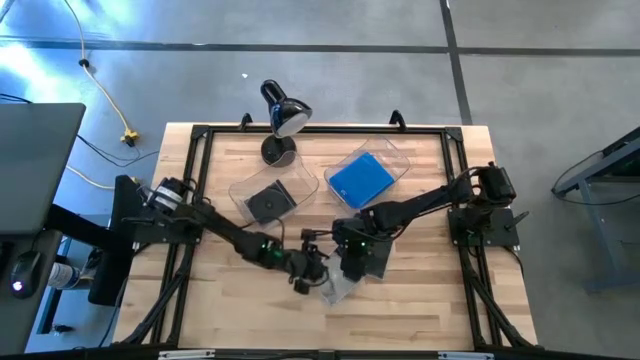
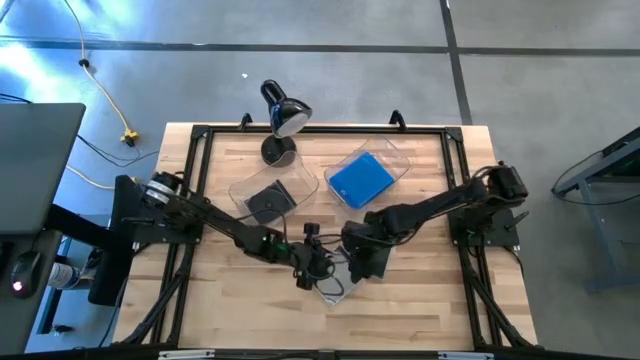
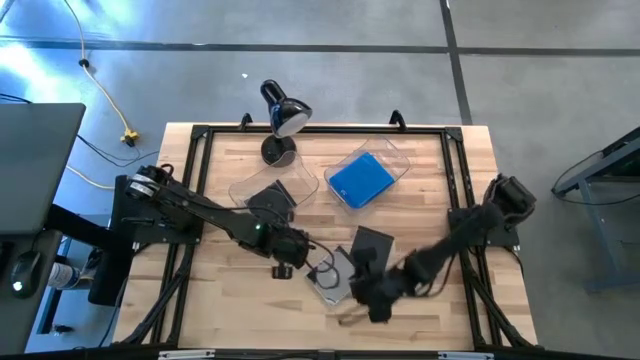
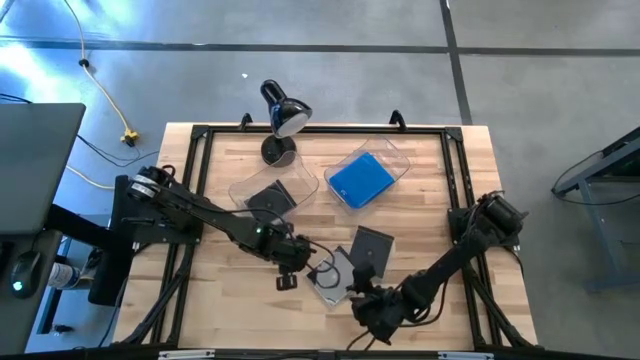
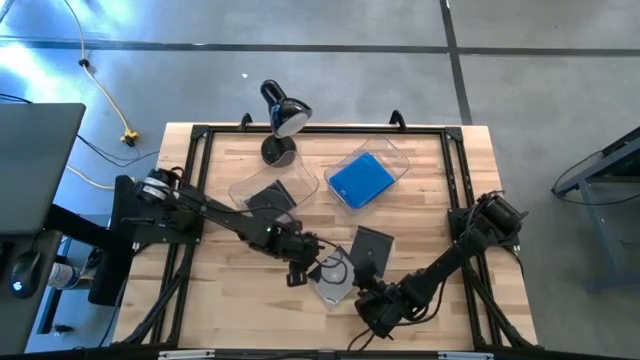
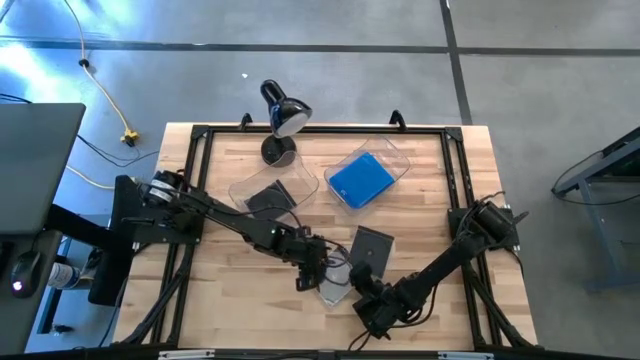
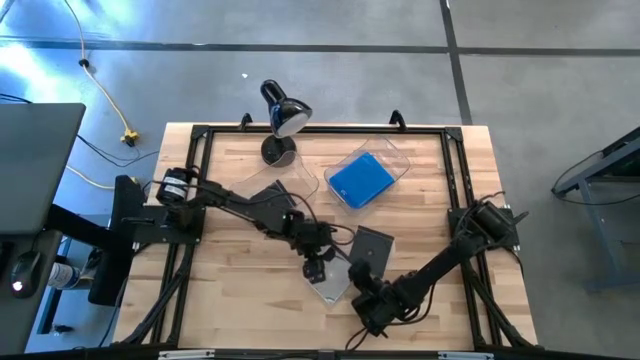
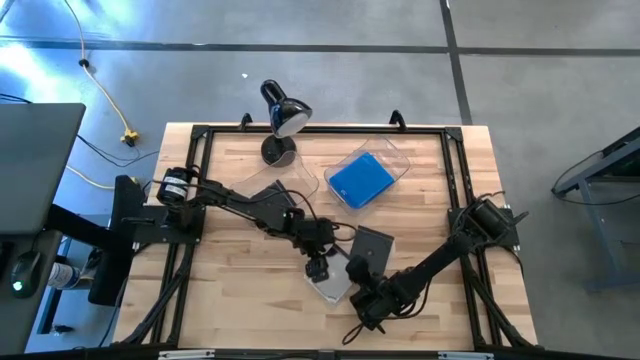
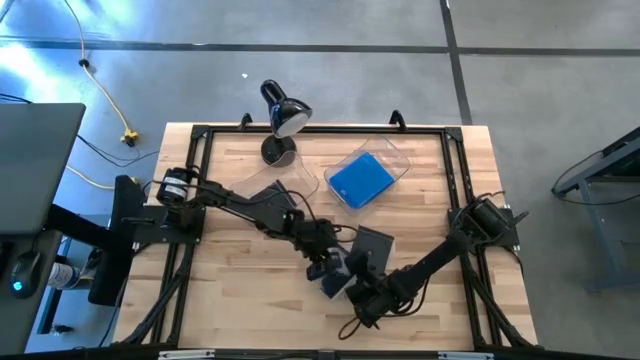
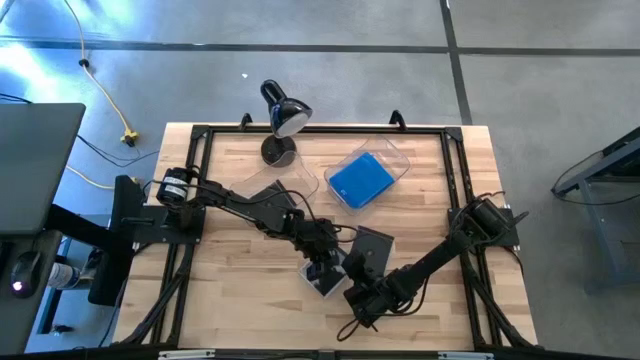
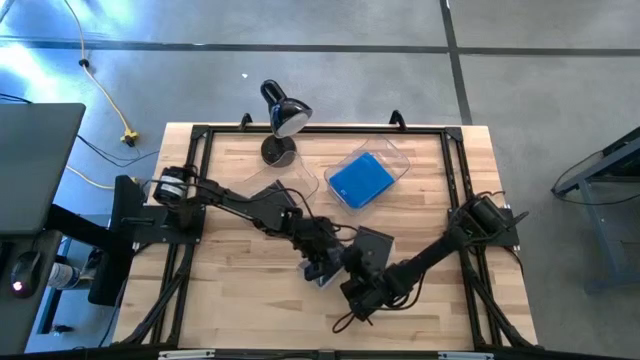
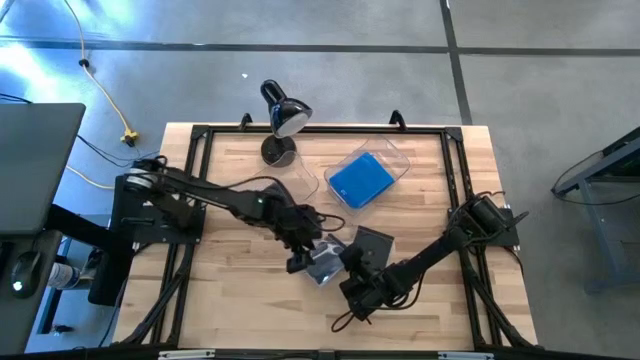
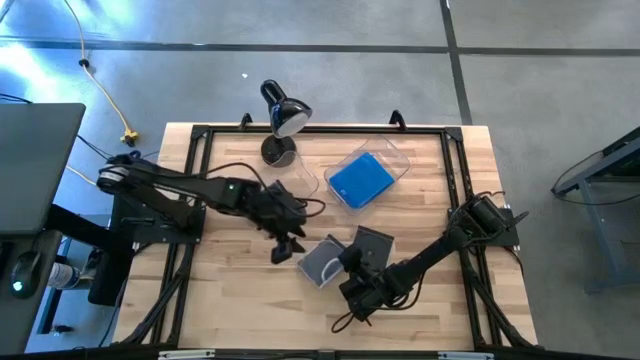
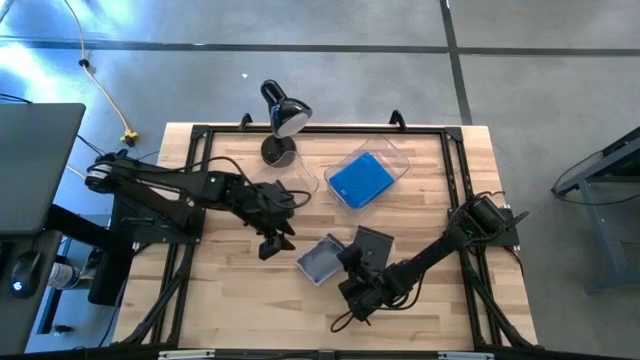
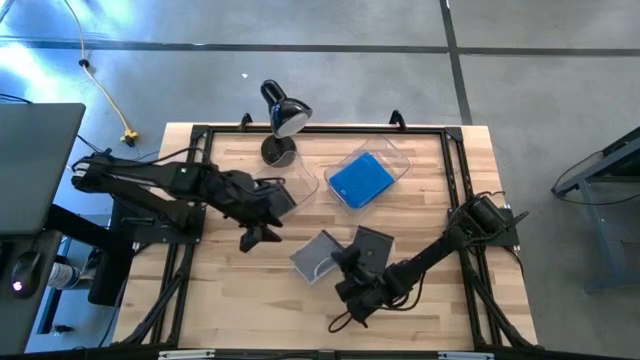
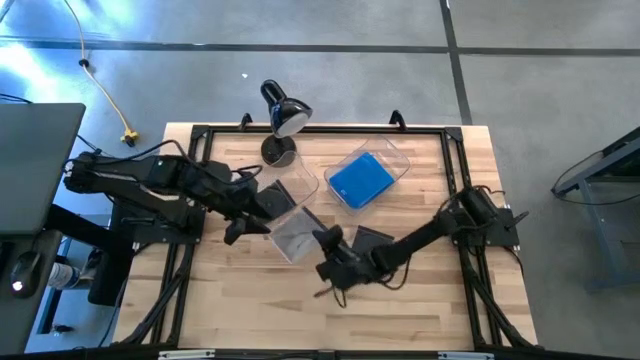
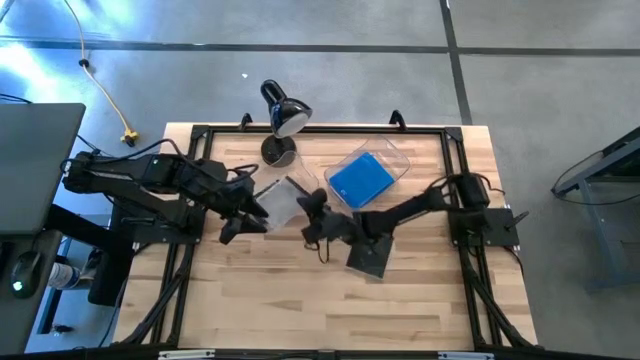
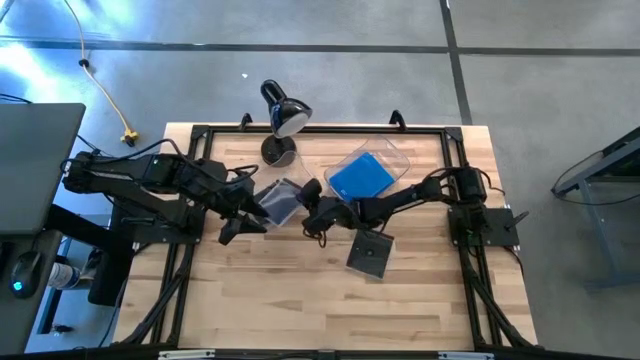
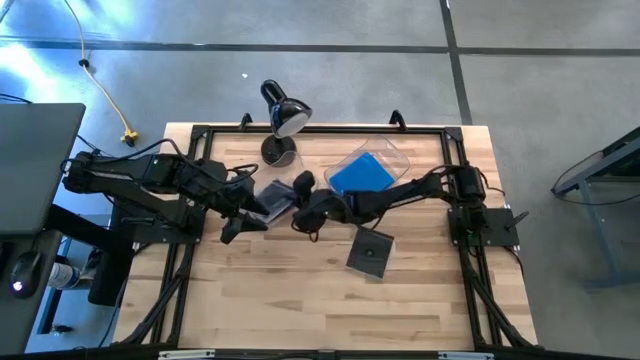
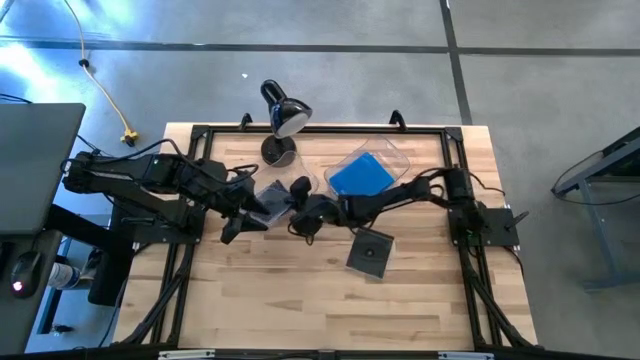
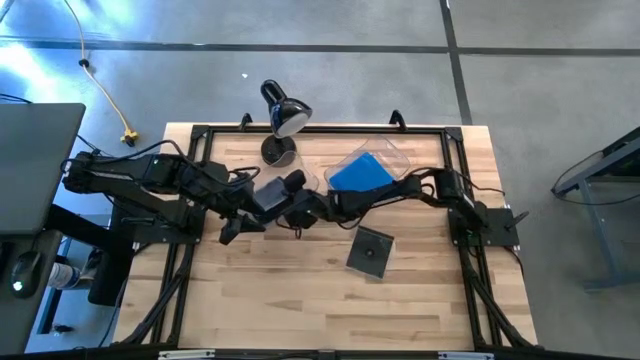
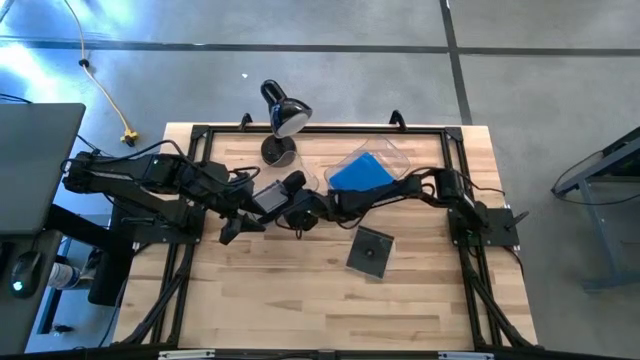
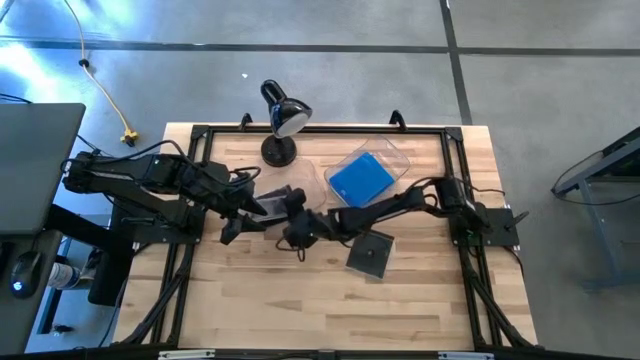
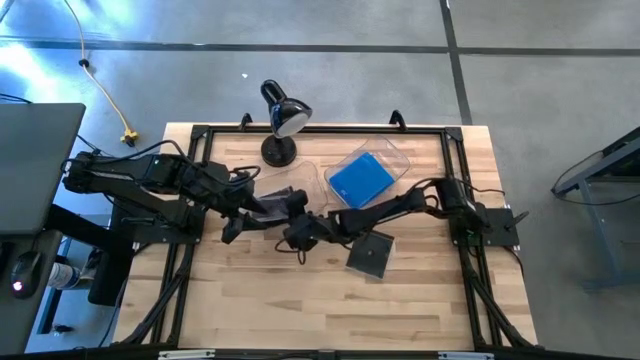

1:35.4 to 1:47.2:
Task: Pick & place jewel cases by type
Put the left black CD case into the left transparent bin

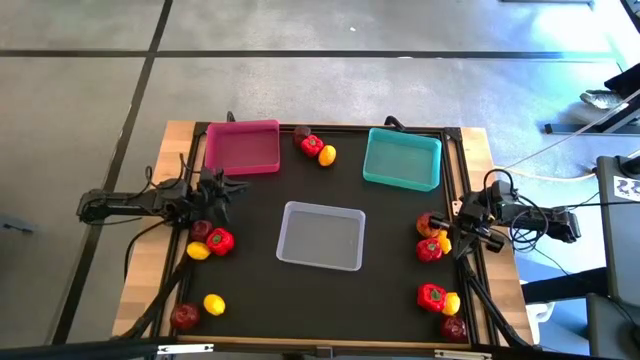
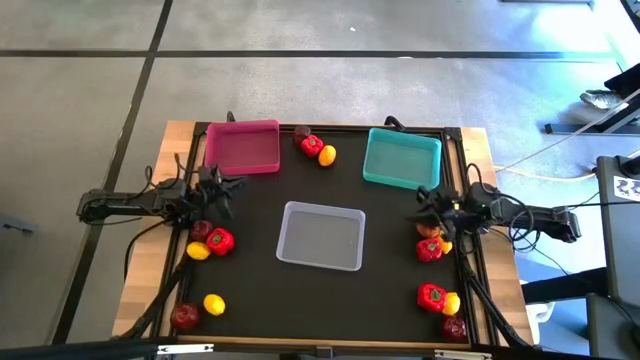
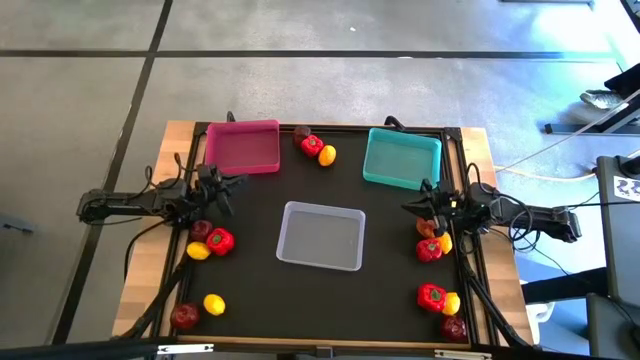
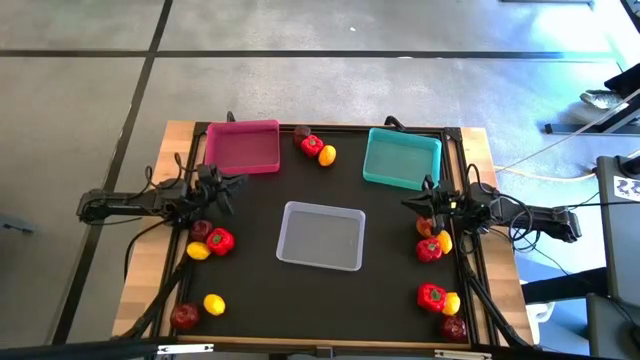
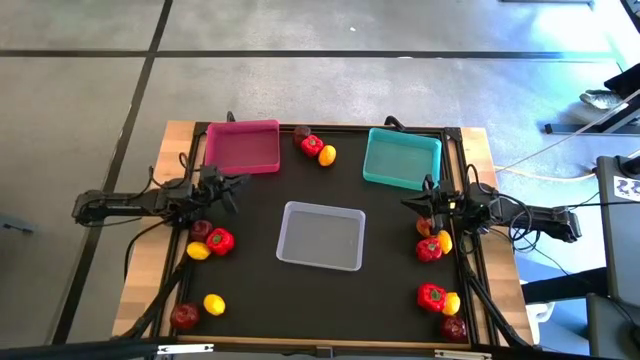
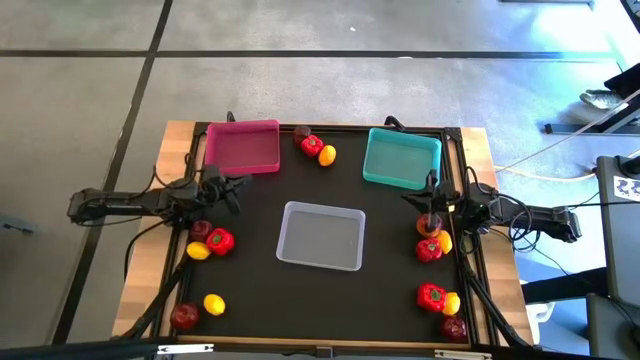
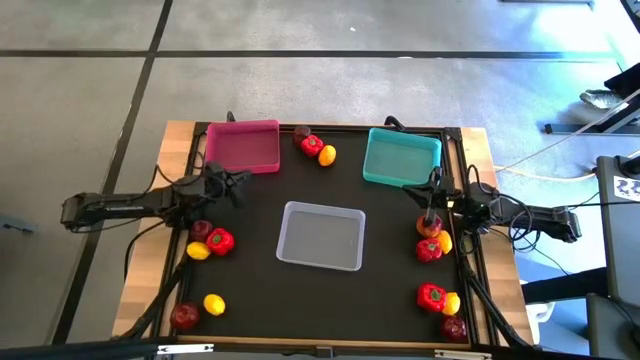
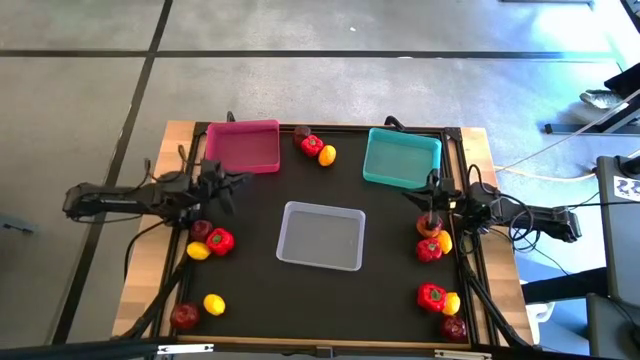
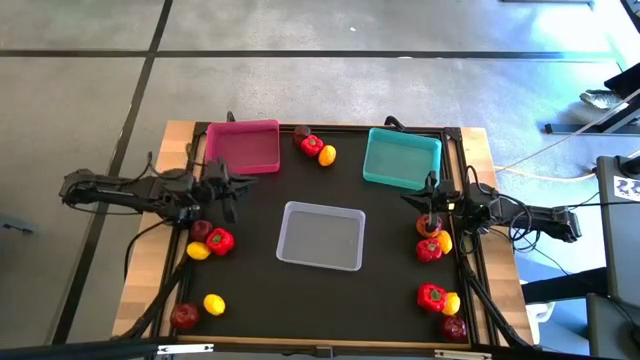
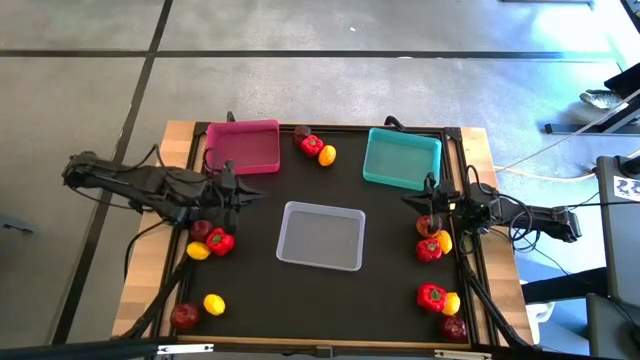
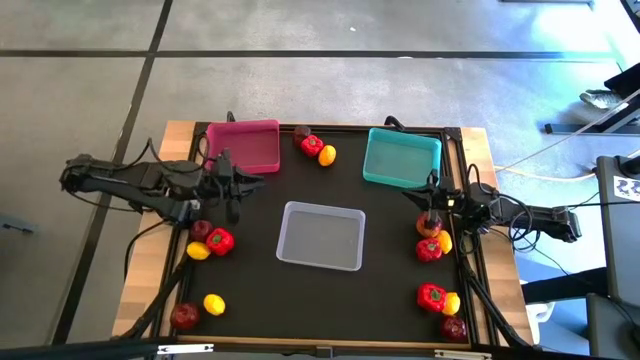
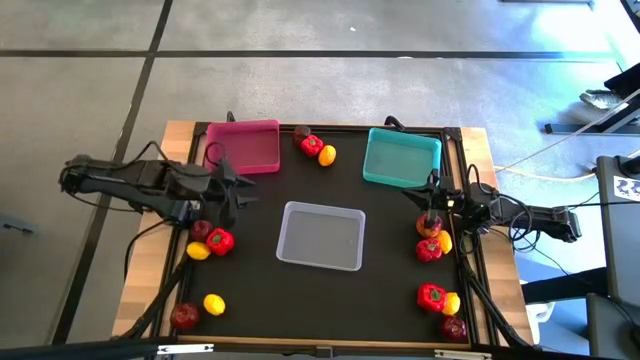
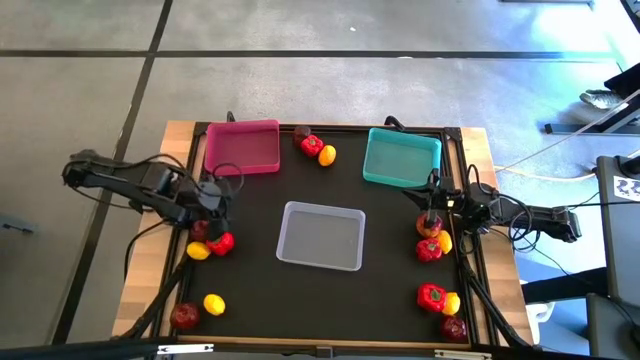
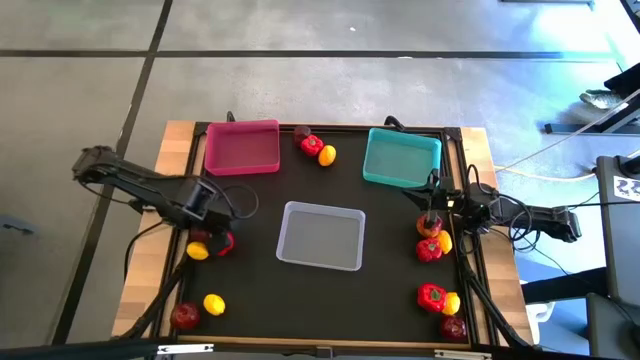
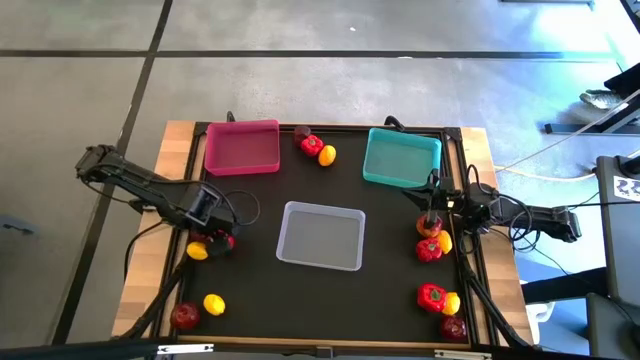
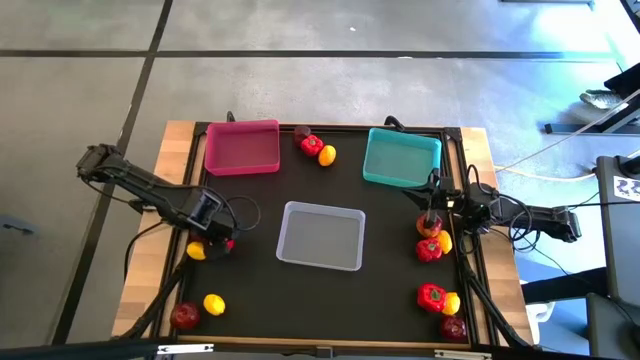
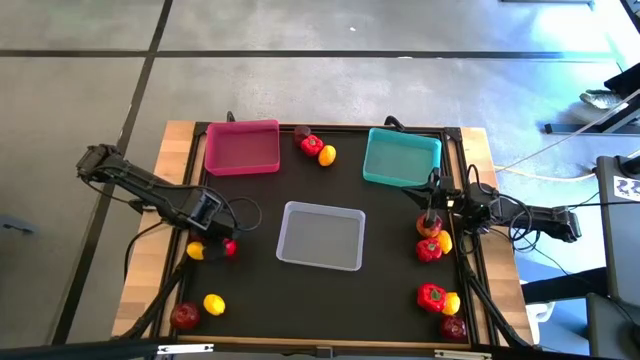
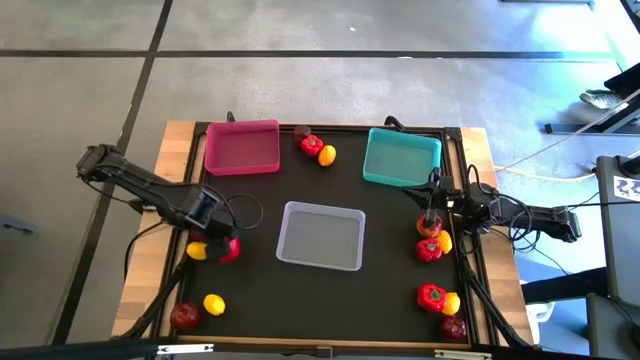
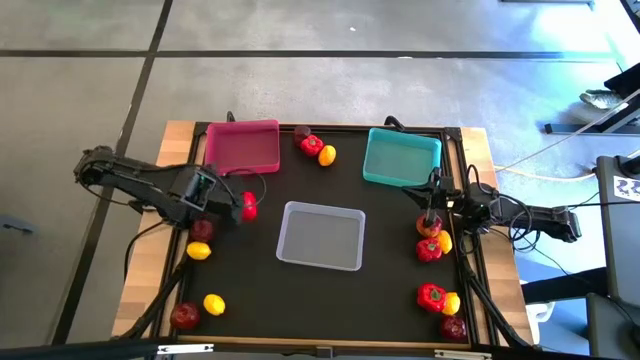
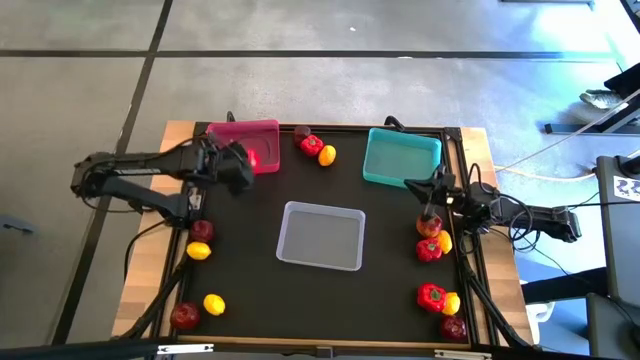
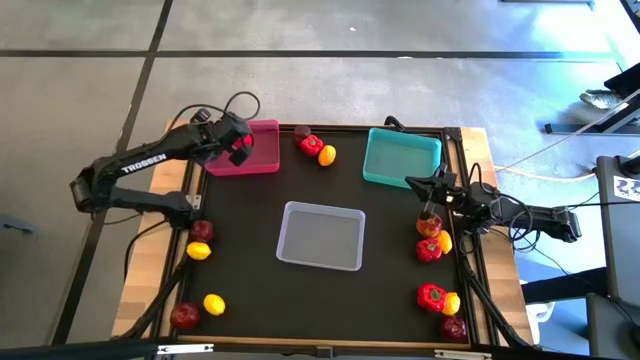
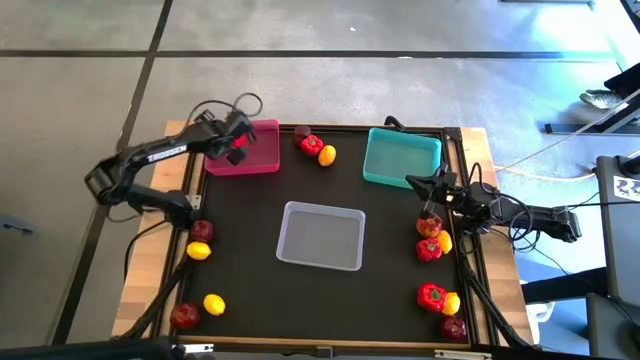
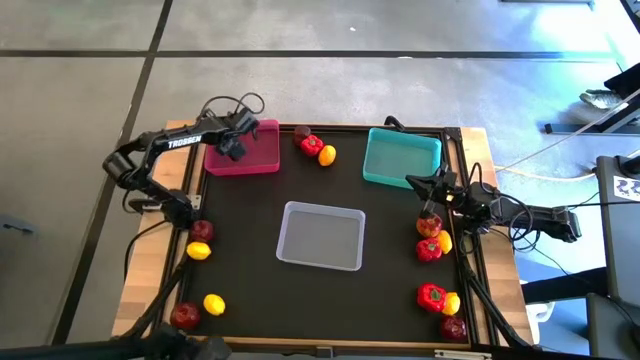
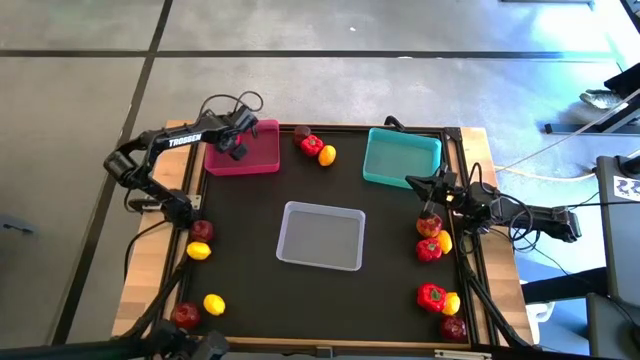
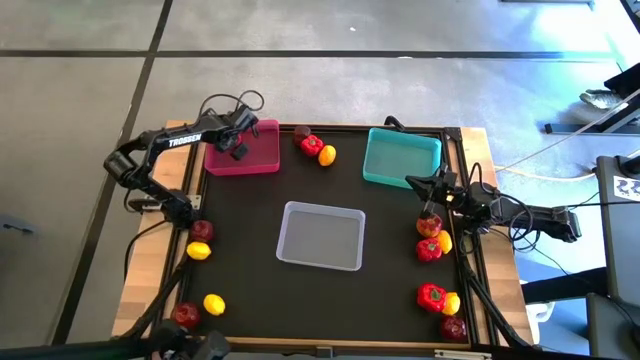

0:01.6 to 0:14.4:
Task: Sort produce into baskets
Put the bell pepper into the pink bin
